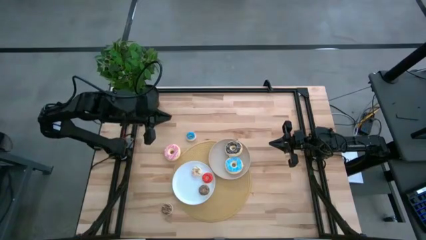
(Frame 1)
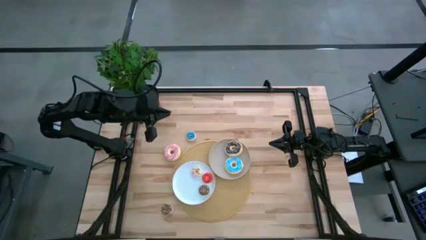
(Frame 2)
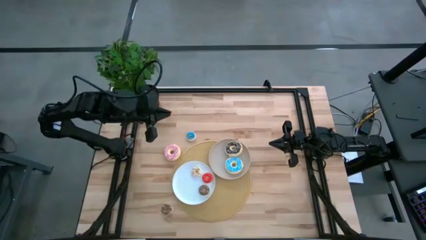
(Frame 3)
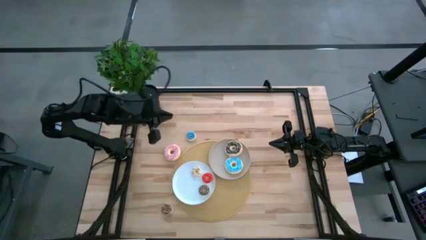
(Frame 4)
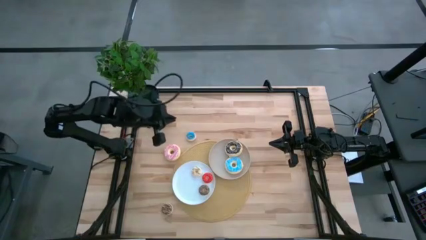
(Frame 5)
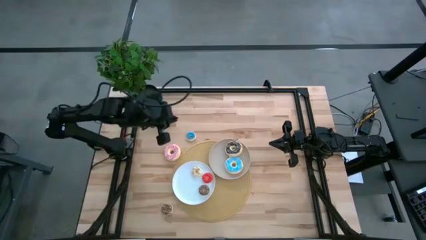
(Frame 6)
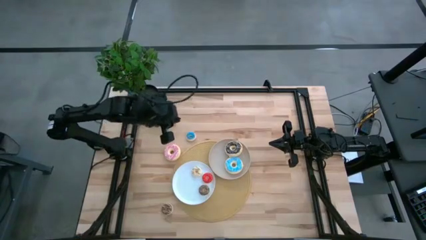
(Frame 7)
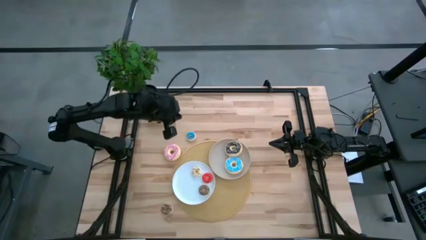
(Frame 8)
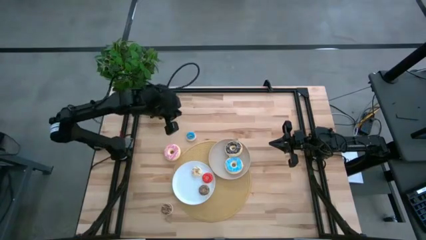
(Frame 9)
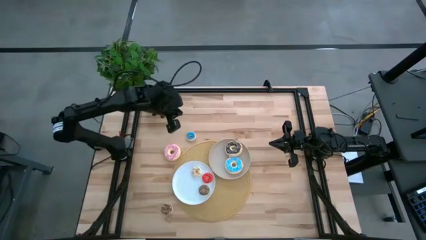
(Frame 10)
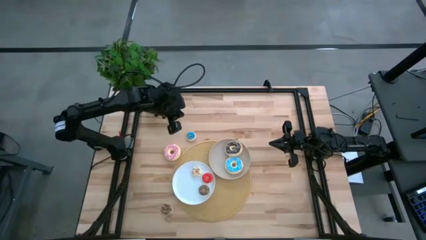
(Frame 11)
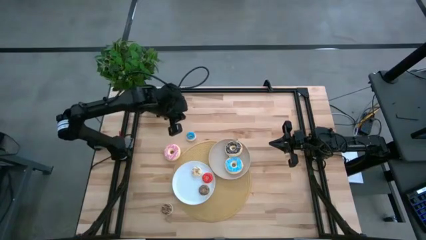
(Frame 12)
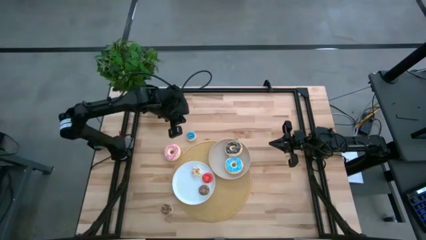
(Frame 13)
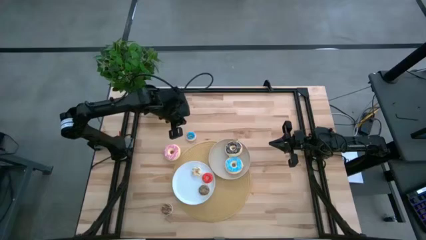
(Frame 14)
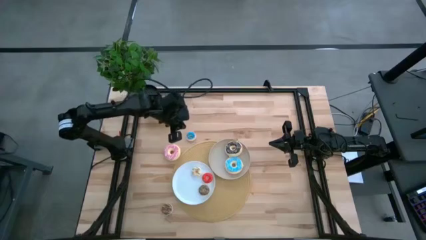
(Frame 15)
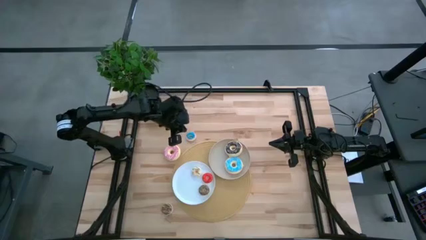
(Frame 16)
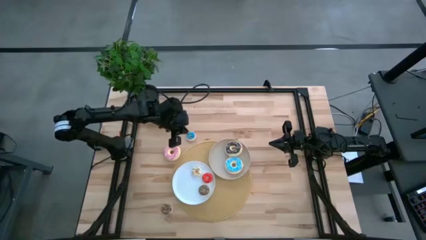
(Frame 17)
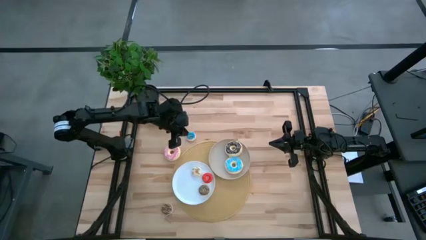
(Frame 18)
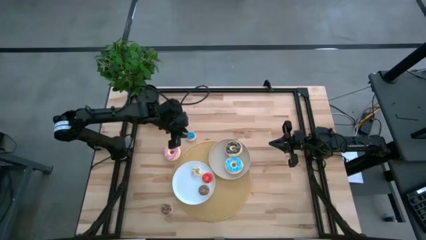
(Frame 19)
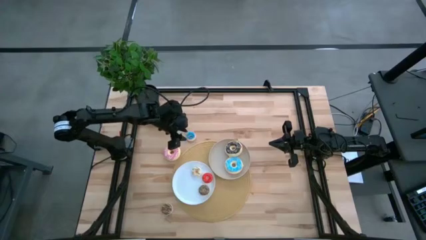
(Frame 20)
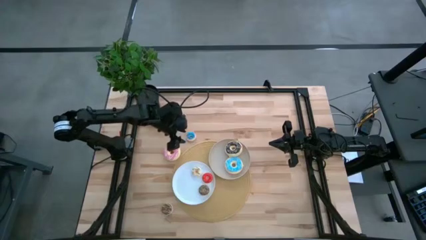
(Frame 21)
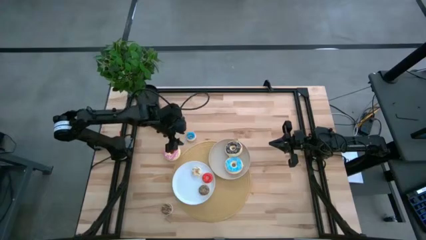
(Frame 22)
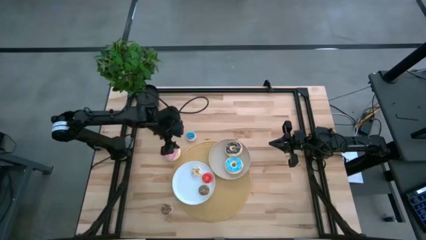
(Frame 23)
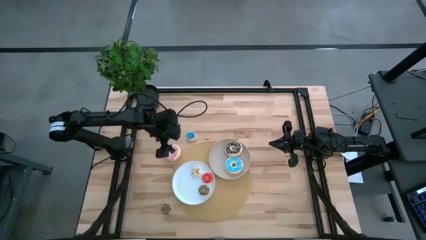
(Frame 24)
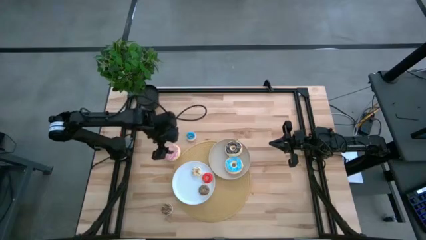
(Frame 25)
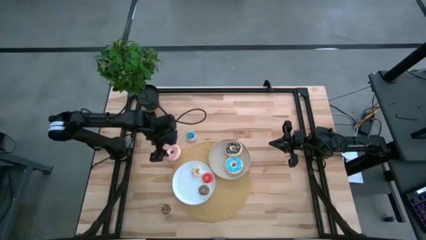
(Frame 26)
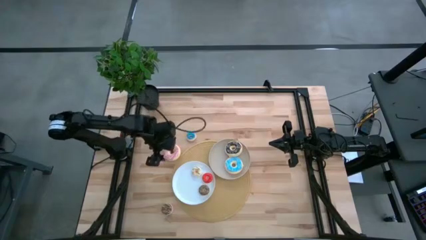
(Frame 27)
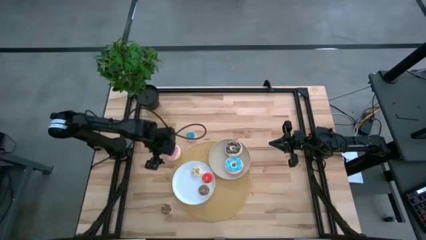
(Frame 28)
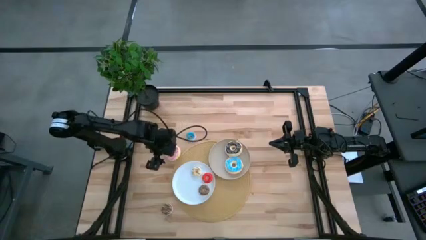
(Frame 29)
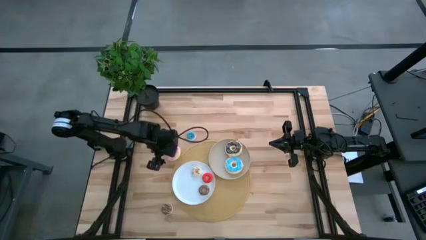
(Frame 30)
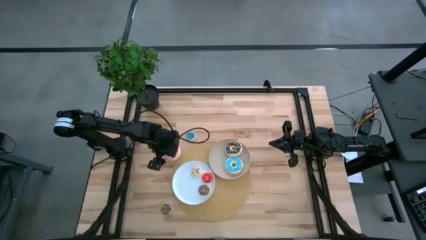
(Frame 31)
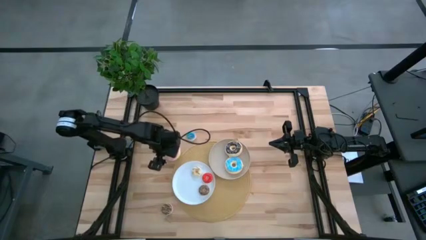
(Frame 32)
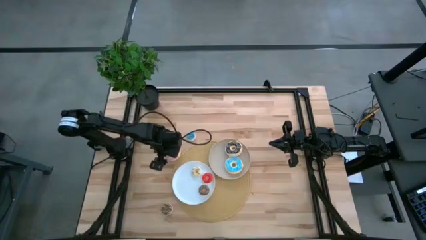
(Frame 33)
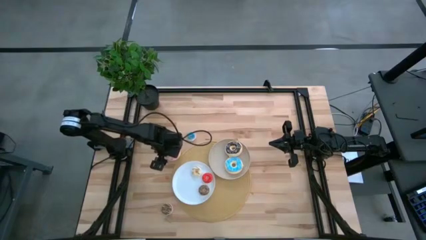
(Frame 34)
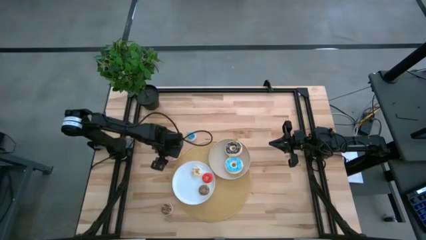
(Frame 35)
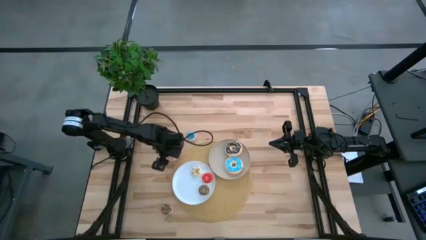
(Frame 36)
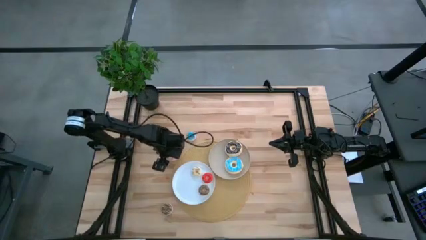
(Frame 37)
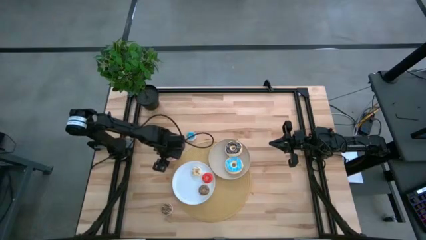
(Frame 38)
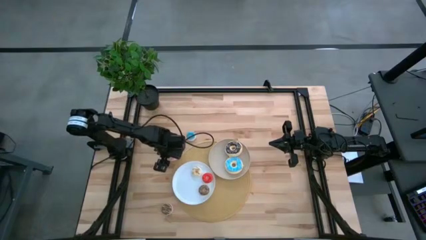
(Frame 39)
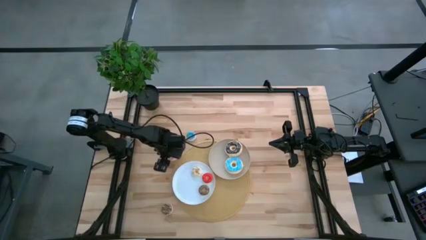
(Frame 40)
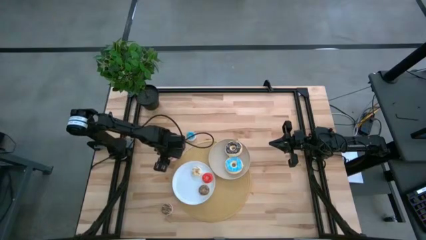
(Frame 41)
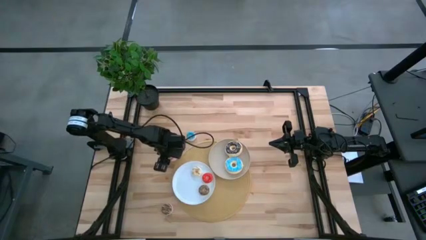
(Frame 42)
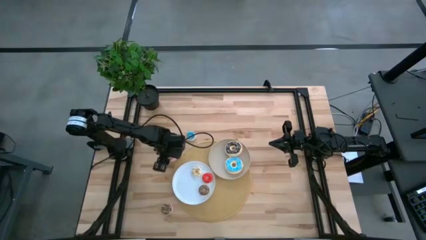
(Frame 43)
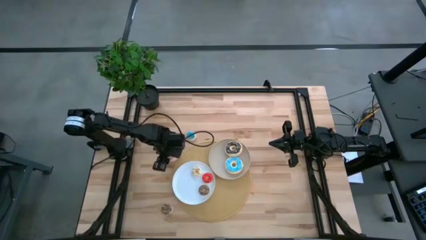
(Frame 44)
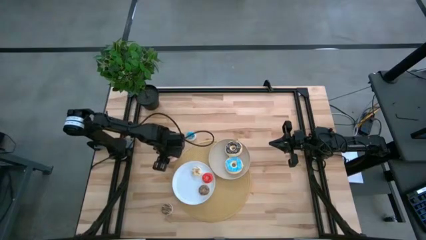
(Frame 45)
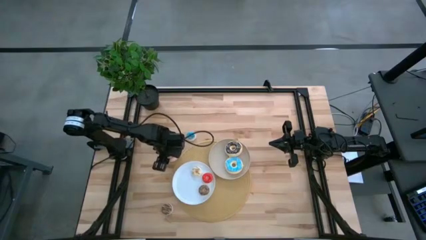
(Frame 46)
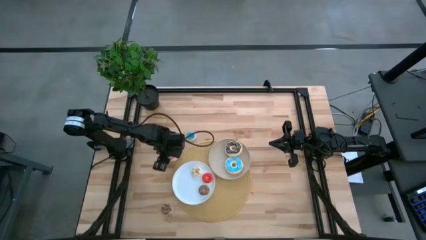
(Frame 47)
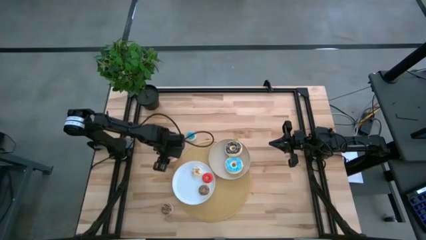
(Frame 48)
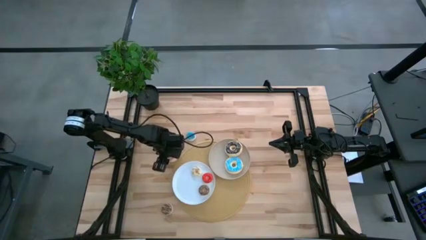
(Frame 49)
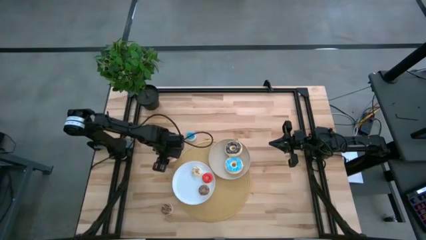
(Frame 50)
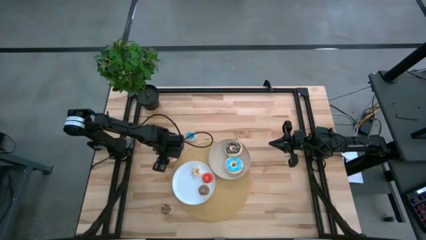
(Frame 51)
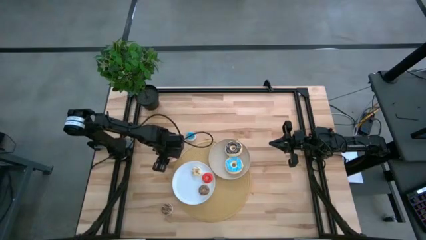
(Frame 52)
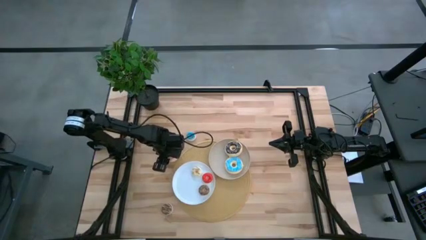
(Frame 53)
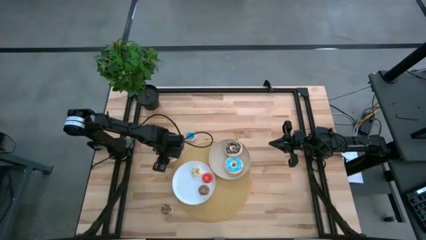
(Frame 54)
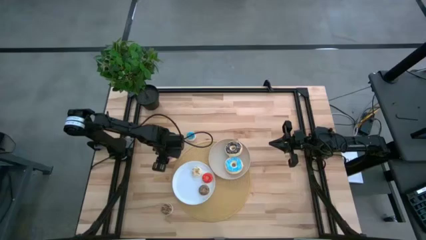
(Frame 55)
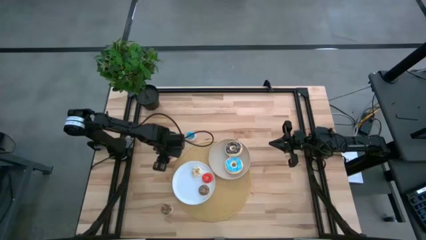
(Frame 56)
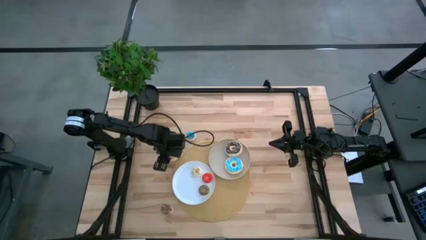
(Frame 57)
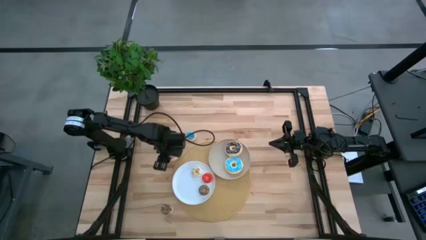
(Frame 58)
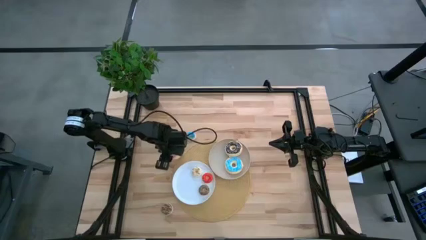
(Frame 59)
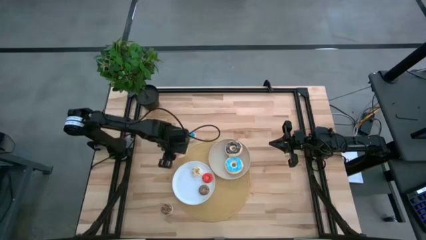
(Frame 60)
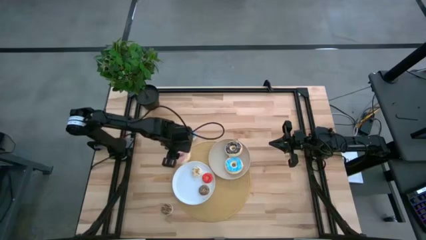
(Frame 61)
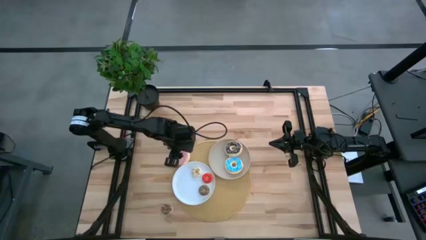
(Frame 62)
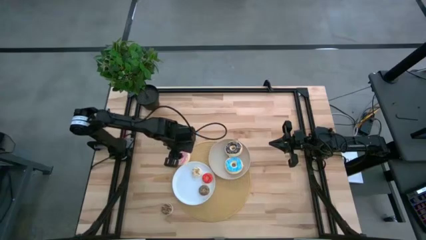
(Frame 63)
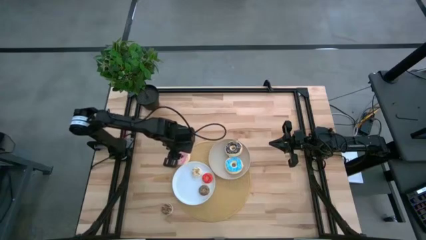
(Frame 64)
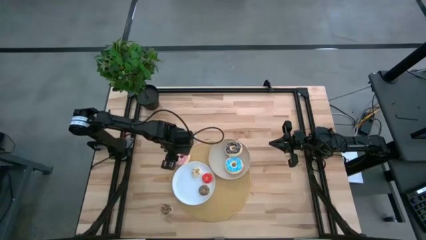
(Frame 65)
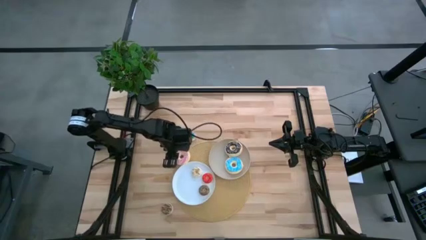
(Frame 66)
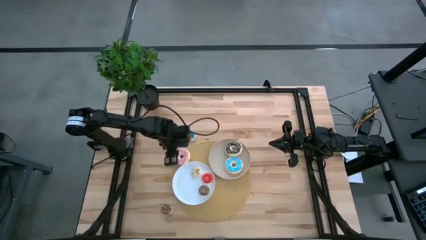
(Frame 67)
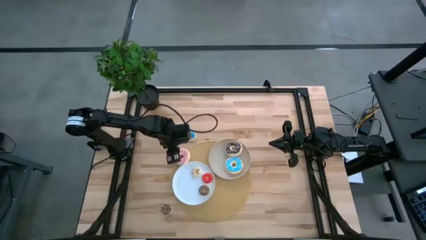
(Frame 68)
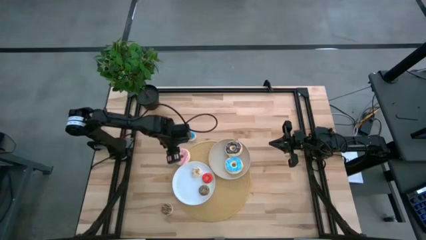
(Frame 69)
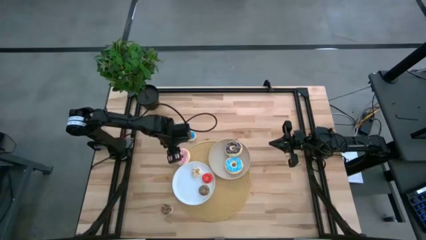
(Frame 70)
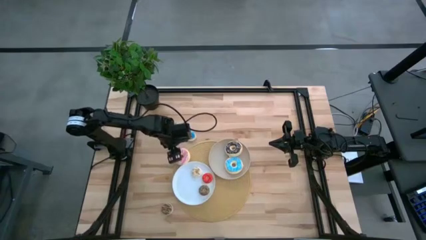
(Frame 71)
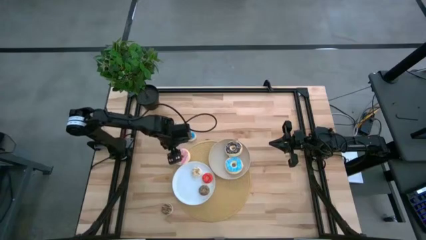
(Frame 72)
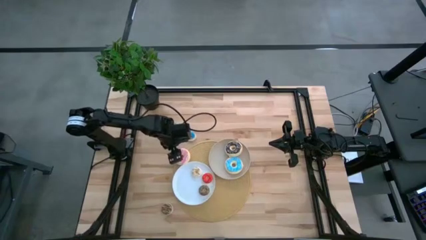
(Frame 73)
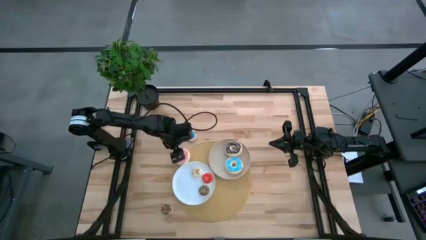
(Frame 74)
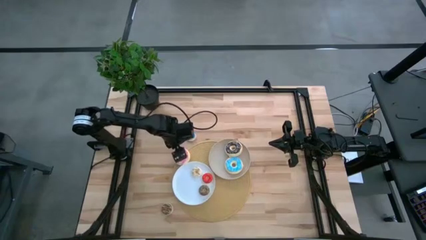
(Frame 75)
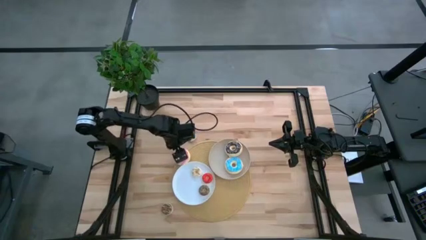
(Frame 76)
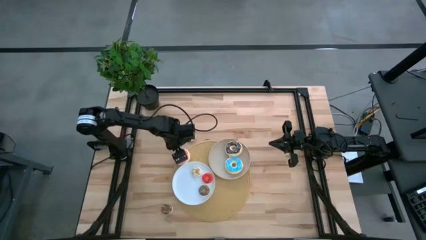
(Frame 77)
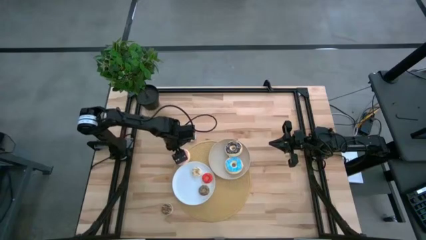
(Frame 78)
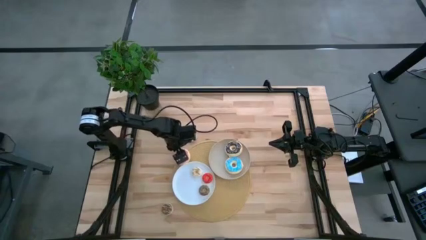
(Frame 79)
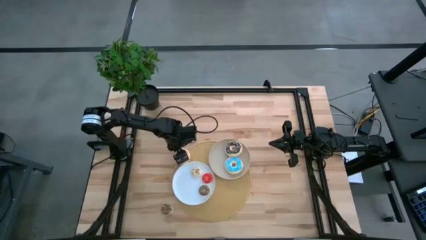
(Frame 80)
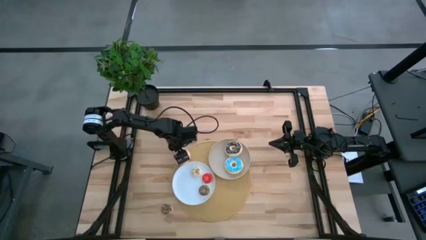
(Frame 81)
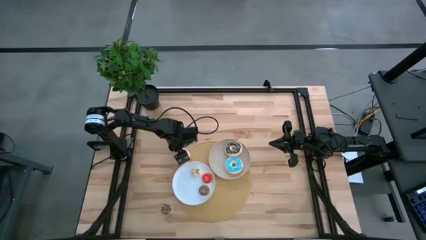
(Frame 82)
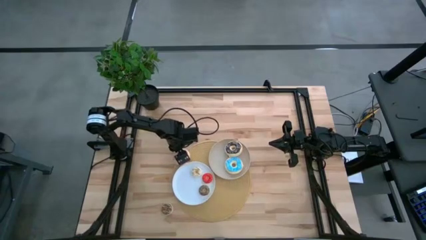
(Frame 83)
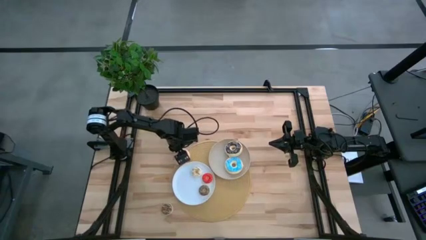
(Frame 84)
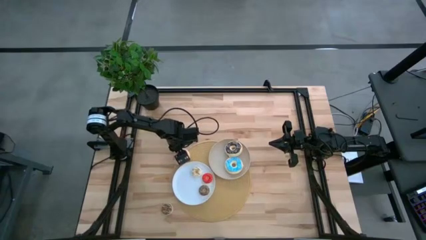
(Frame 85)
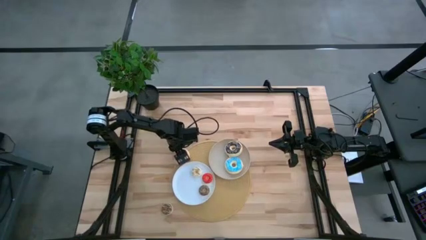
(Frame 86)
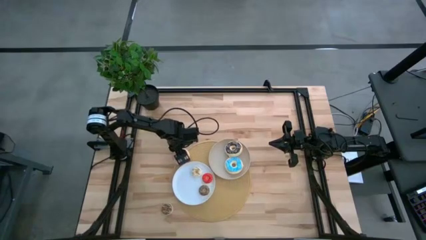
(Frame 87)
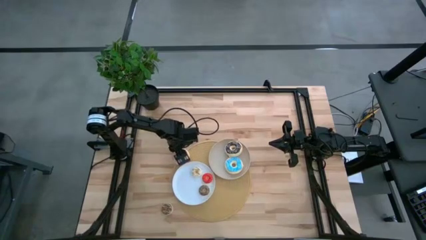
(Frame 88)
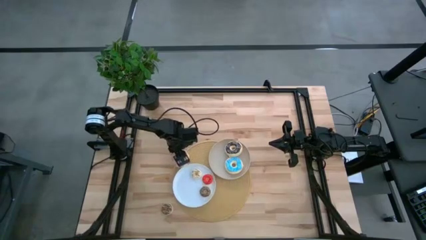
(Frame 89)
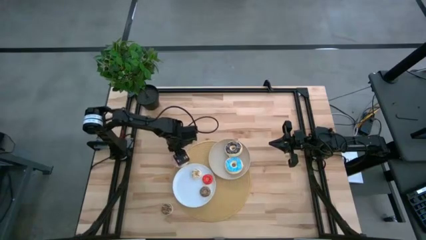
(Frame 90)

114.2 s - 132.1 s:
Task: Pick & Place donuts
Put the large pink donut on the gray plate
